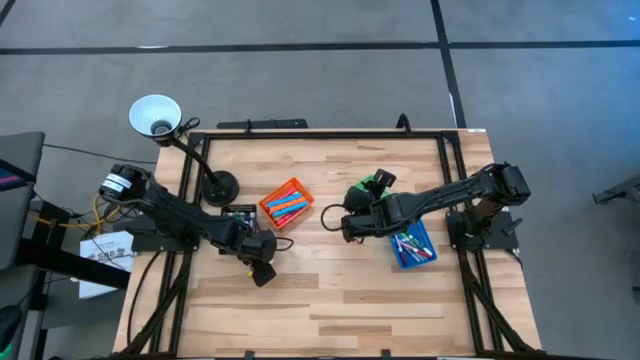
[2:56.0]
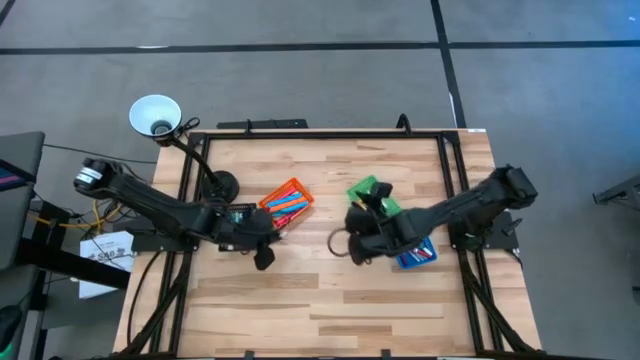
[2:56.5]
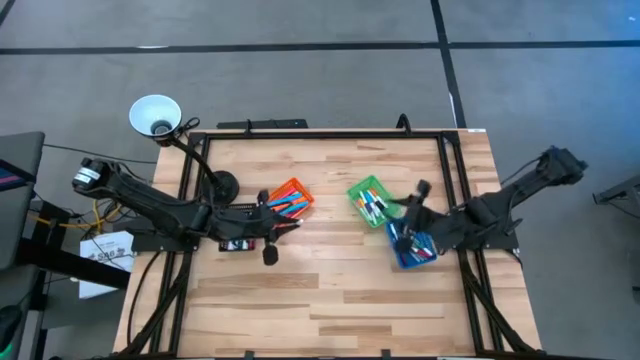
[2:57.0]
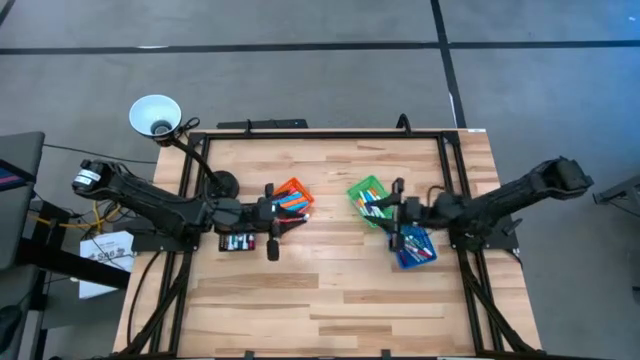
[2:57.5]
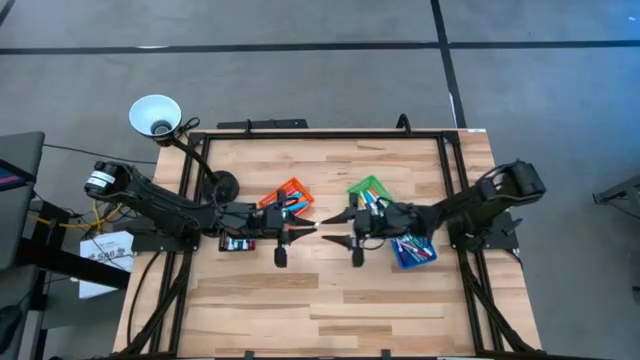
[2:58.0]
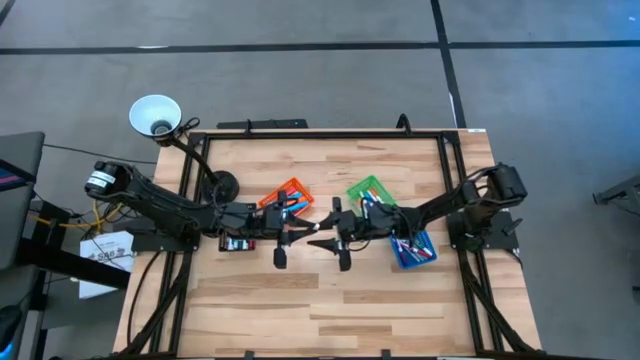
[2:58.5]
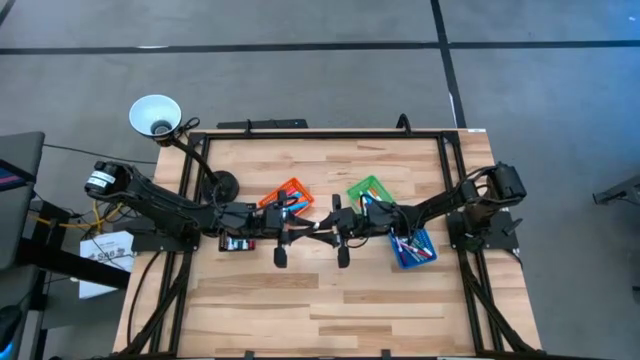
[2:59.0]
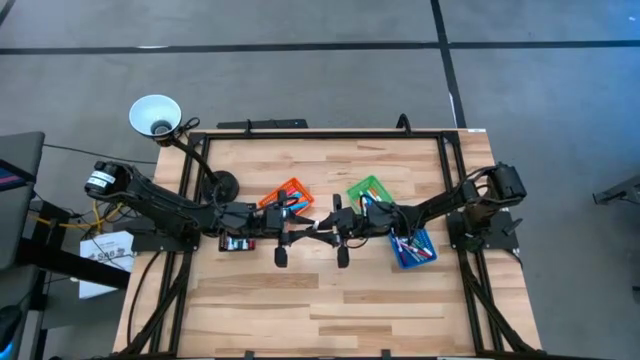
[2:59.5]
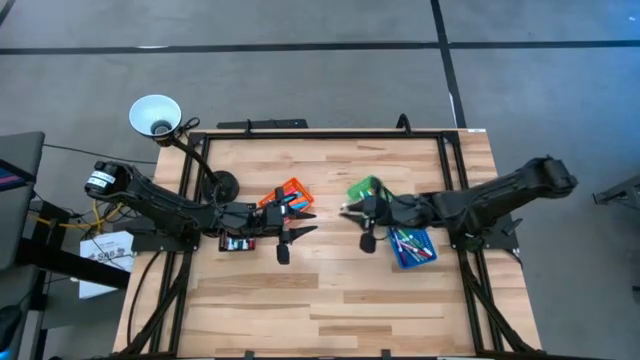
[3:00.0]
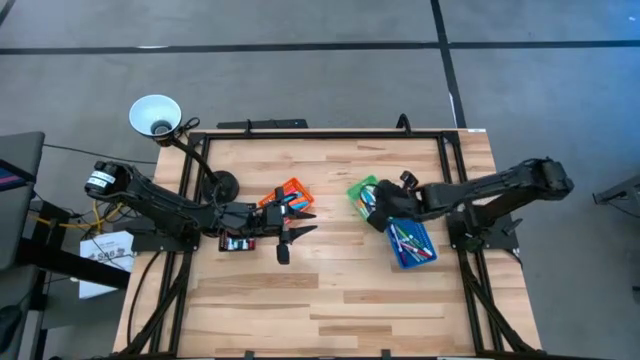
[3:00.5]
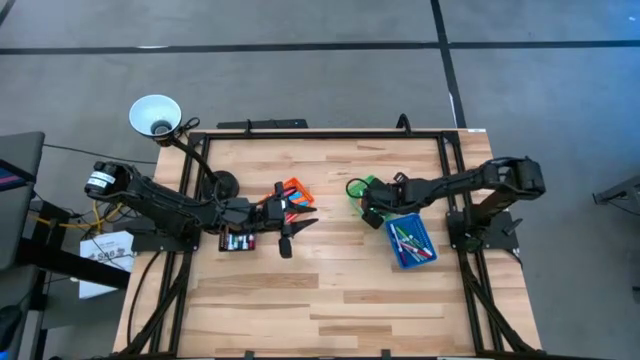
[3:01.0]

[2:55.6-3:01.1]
Task: Pick & Place Markers
Put the yellow pen into the green bin

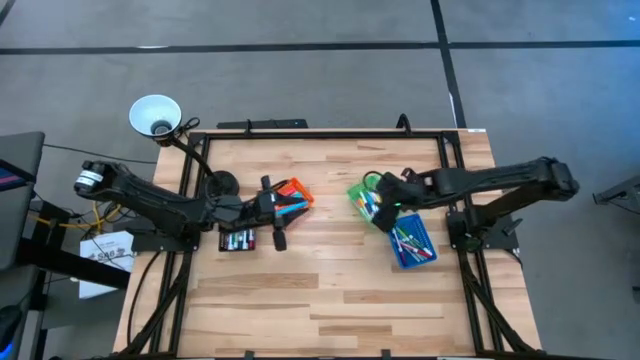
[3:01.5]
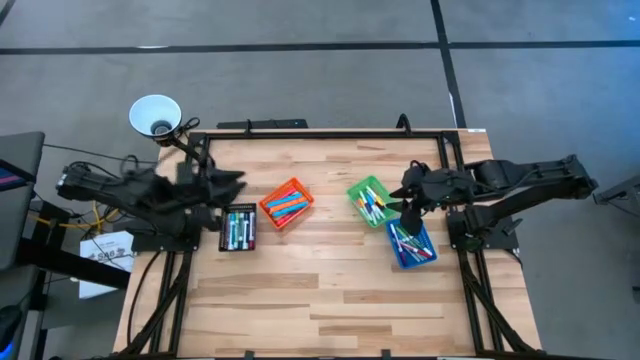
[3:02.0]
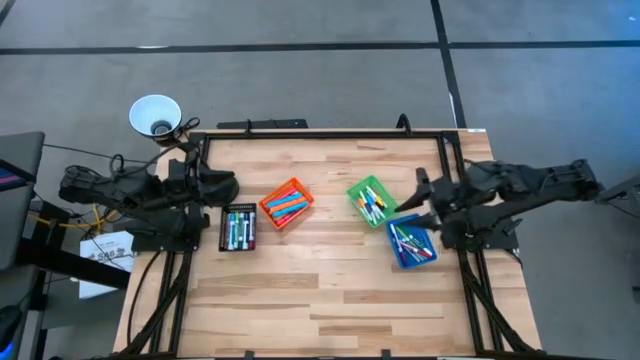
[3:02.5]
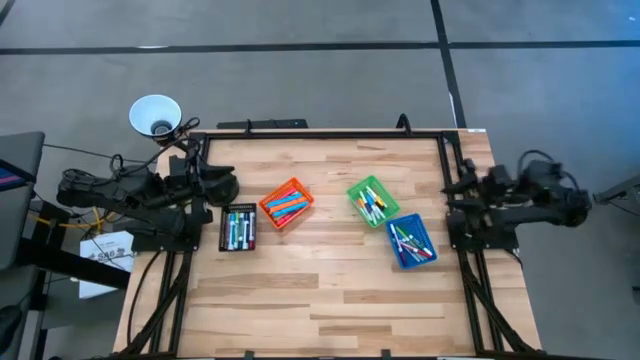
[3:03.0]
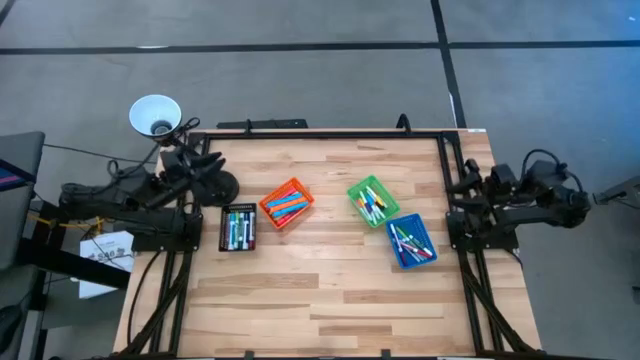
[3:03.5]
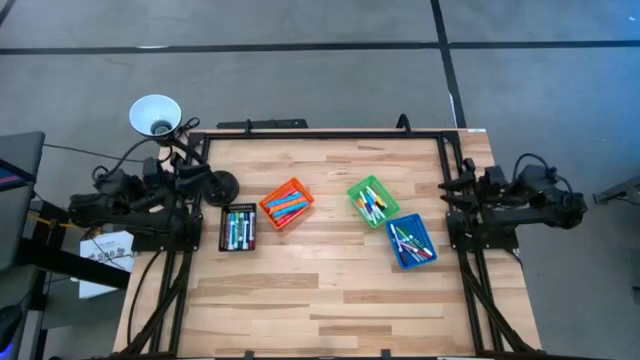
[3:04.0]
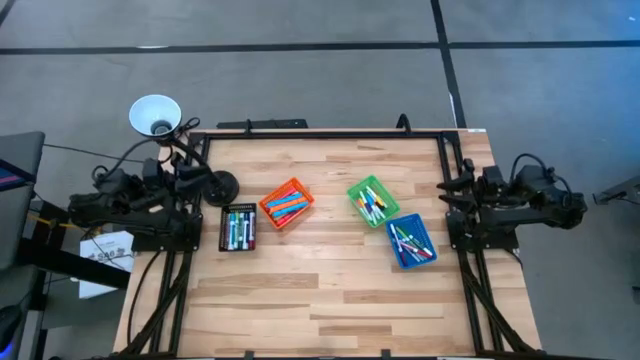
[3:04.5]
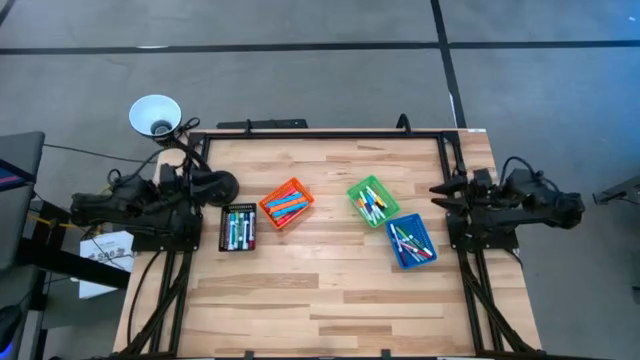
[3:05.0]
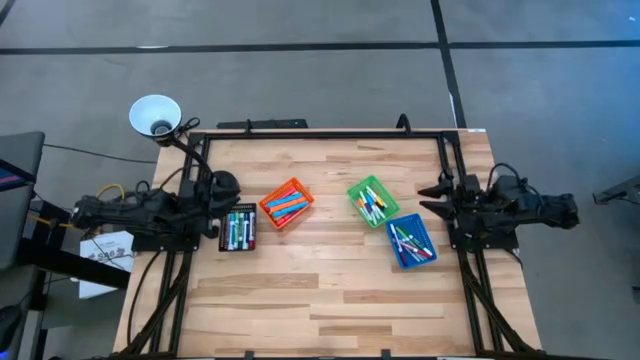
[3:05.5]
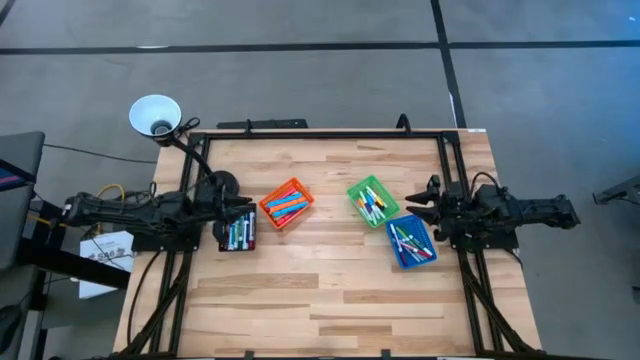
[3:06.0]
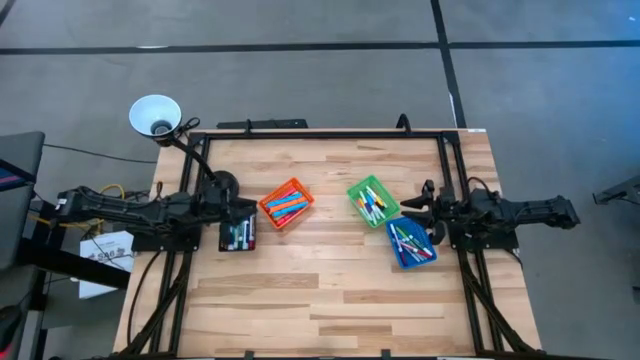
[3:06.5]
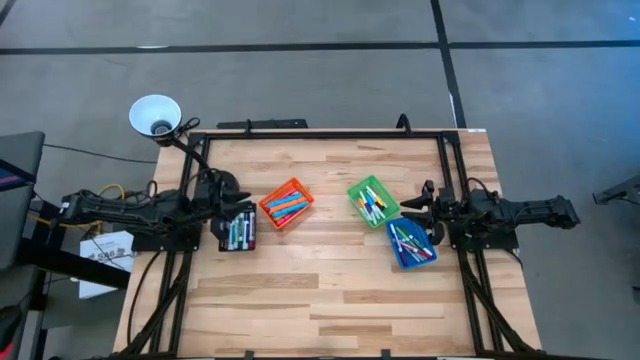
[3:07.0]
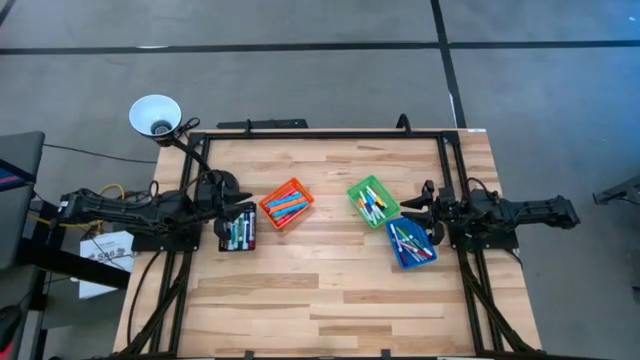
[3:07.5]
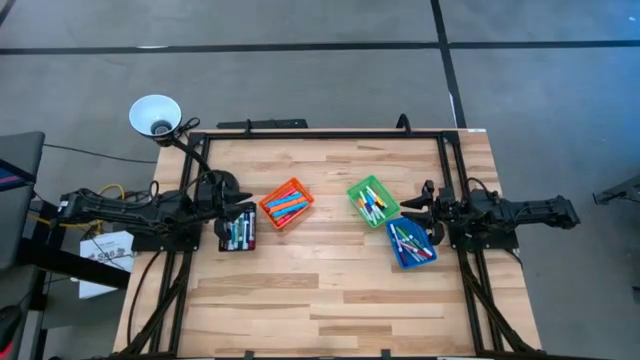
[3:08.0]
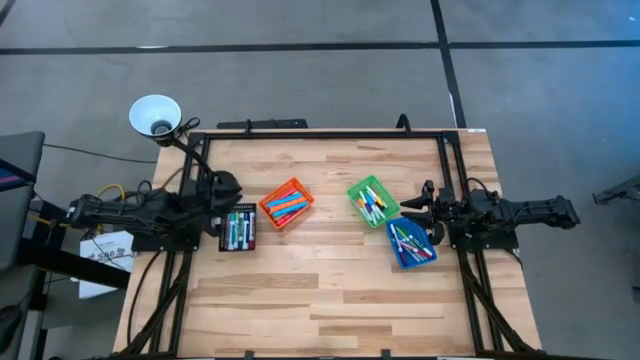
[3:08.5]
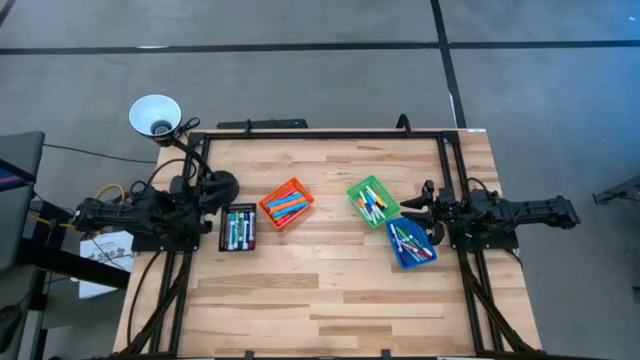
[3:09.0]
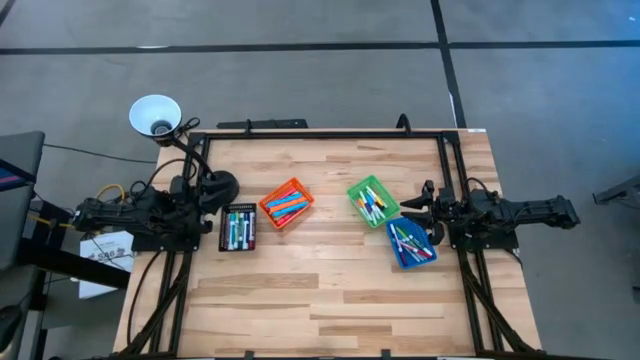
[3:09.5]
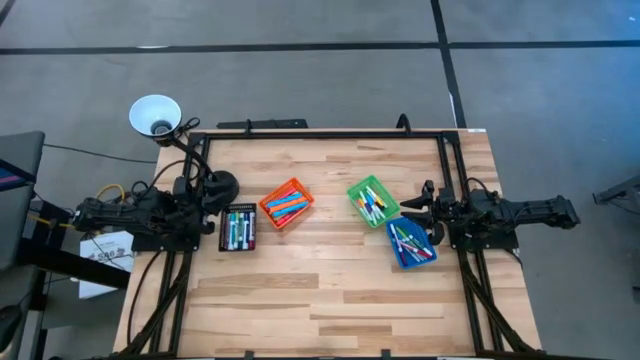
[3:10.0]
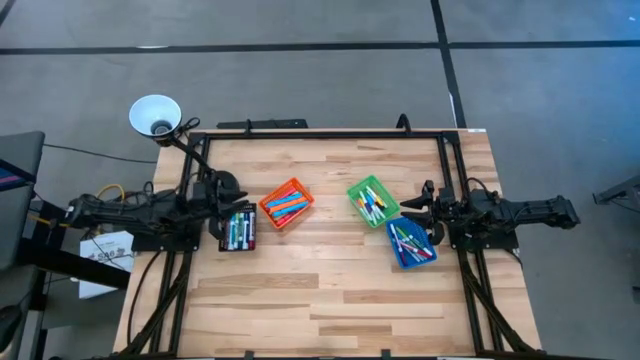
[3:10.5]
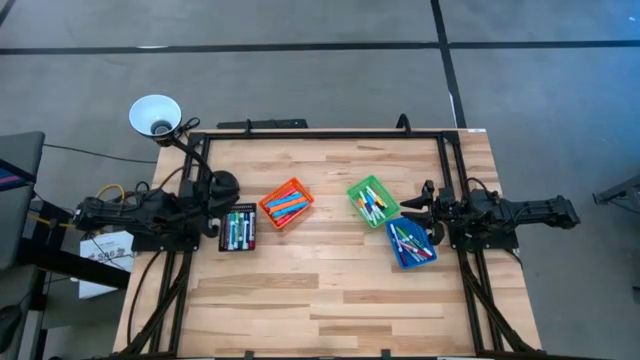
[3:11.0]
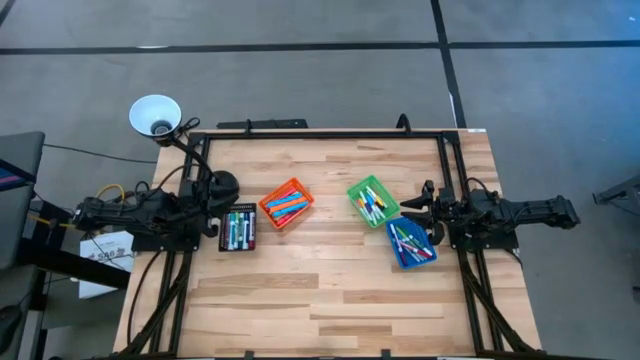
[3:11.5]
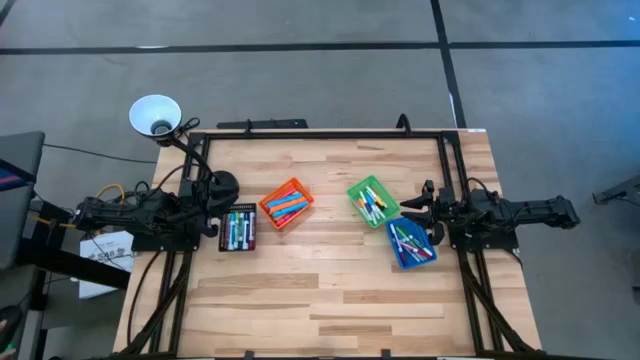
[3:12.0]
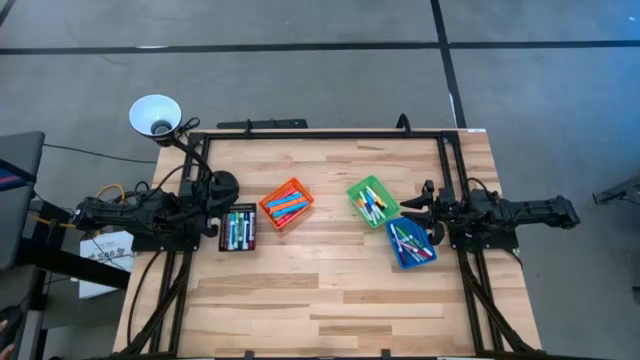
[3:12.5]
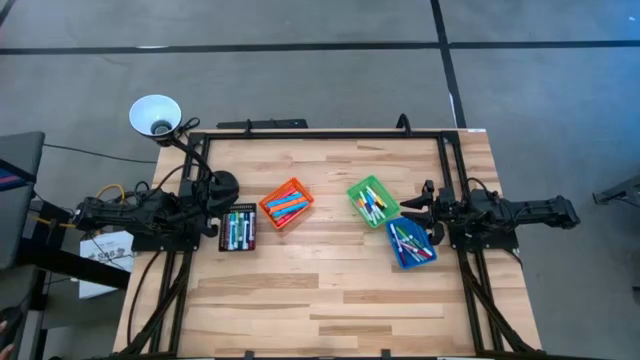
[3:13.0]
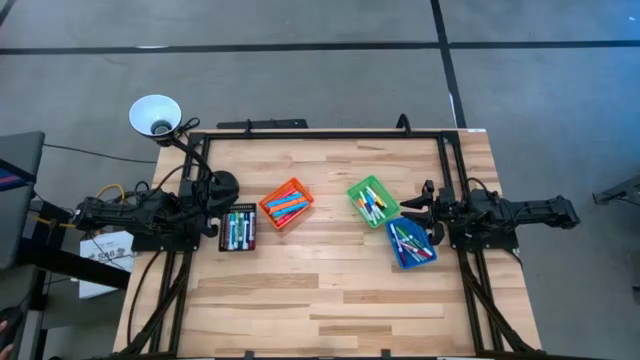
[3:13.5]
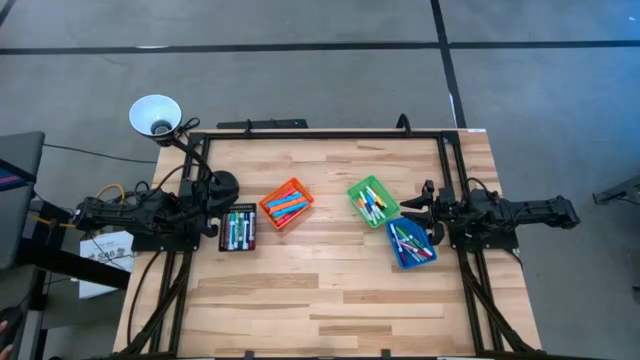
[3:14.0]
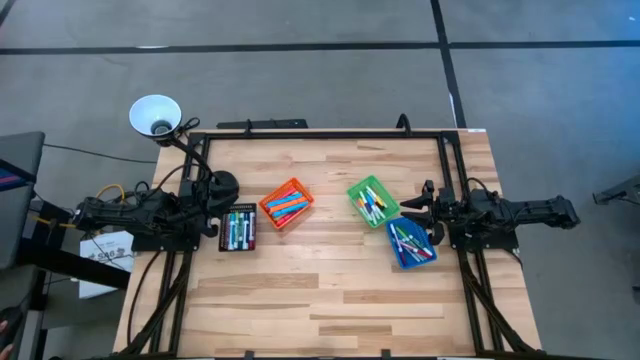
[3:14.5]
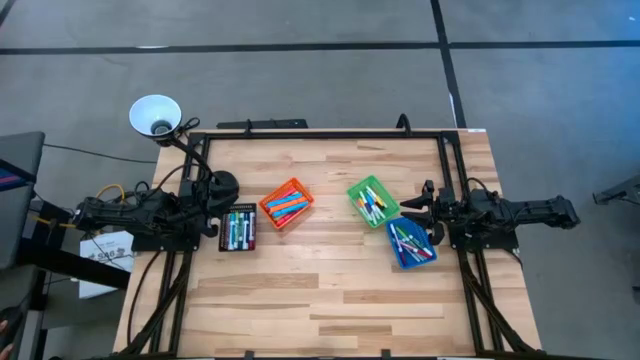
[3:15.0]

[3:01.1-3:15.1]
Return to Home Position

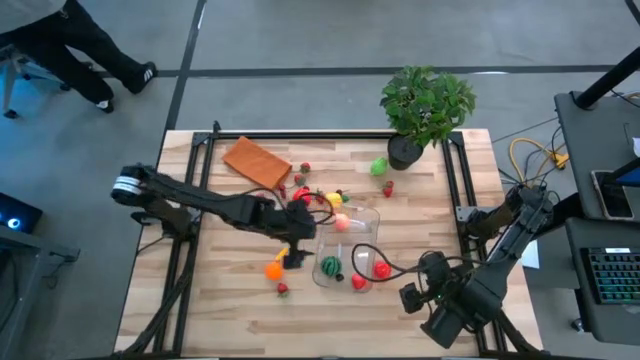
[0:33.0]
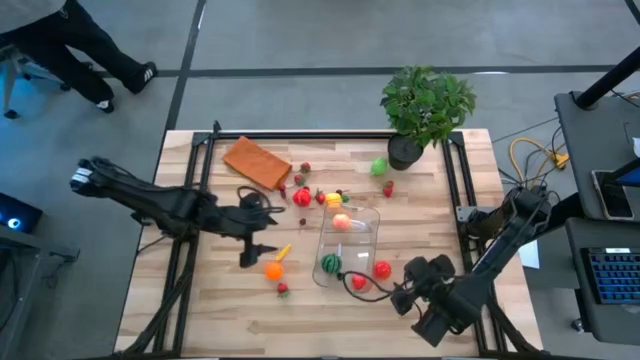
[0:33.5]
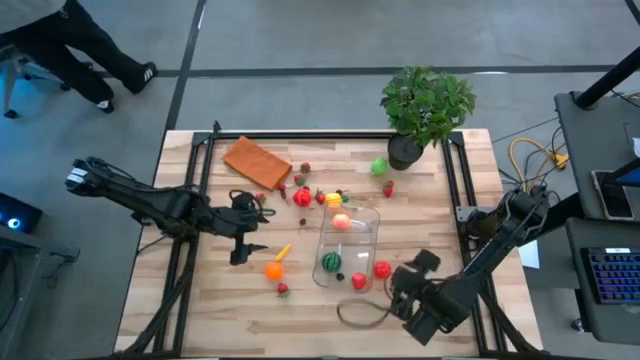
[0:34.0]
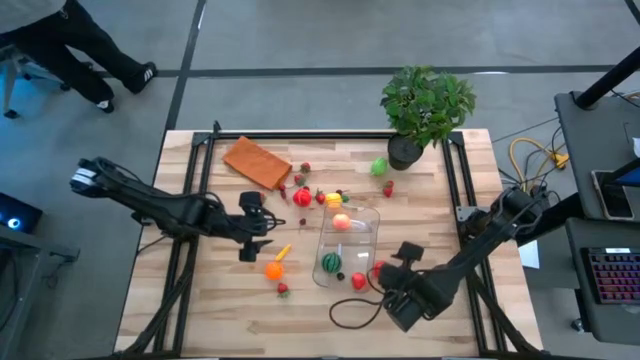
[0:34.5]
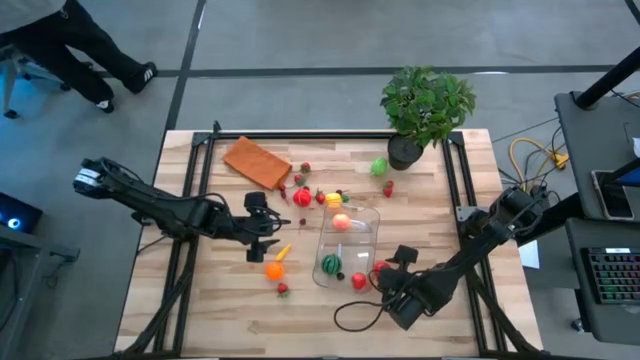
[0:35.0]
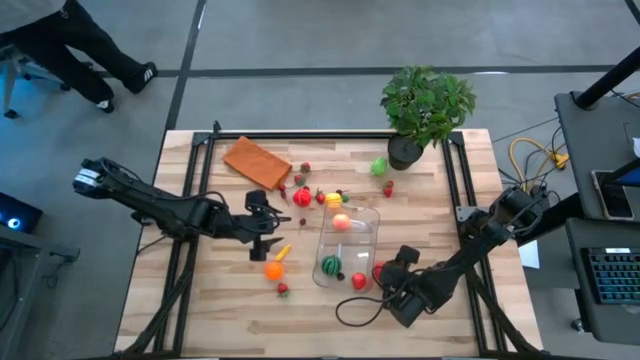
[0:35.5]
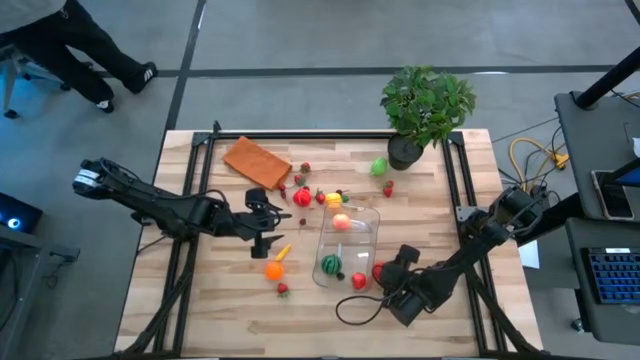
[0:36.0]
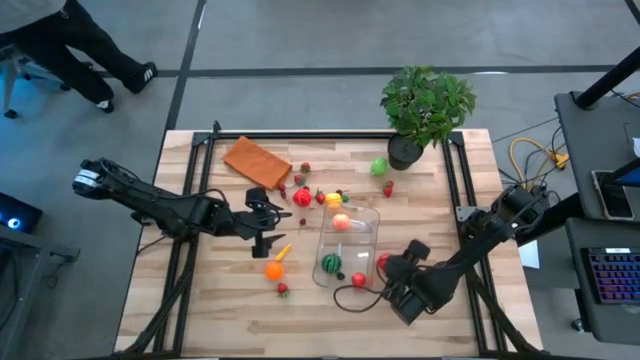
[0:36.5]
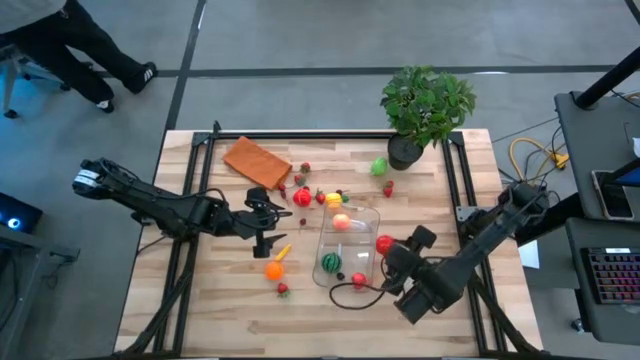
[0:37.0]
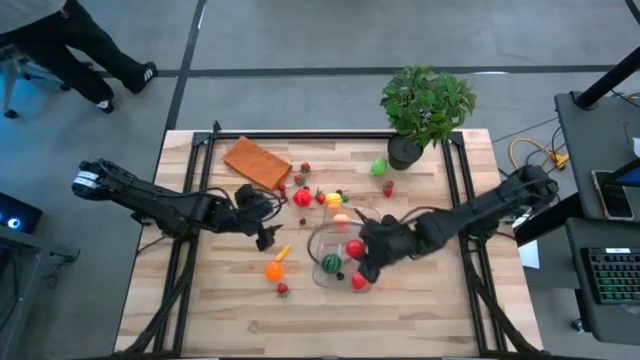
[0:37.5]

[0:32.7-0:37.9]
Task: Pick and placing Produce into tupperware
Put the orange into the transparent bin
